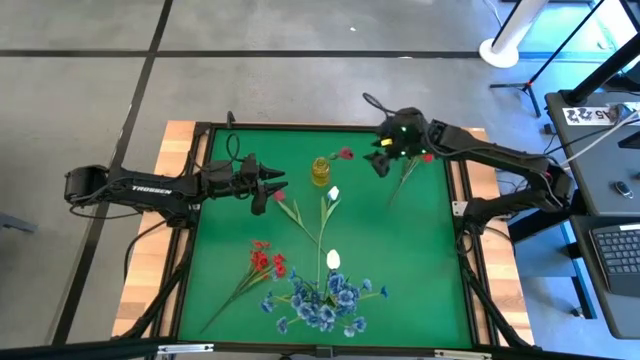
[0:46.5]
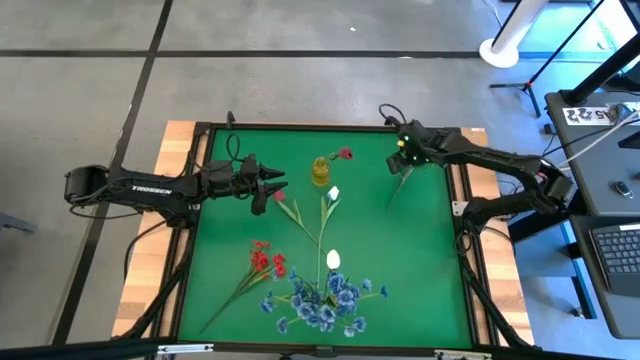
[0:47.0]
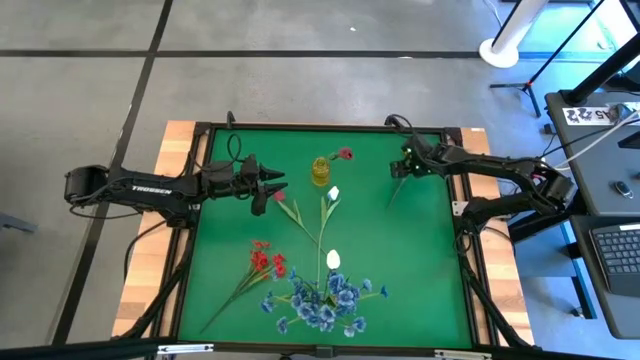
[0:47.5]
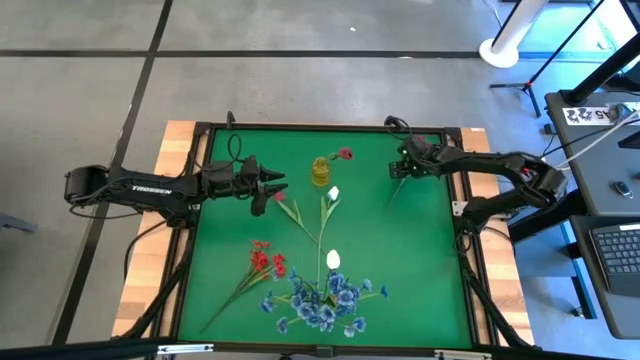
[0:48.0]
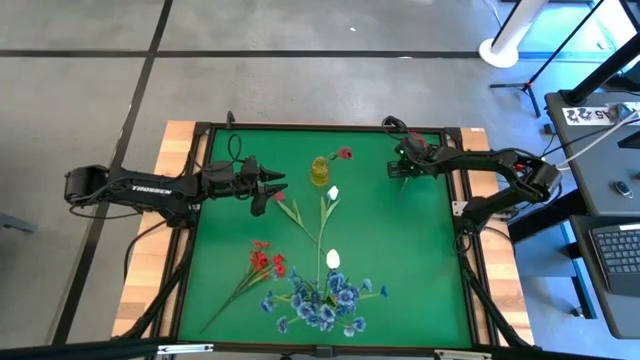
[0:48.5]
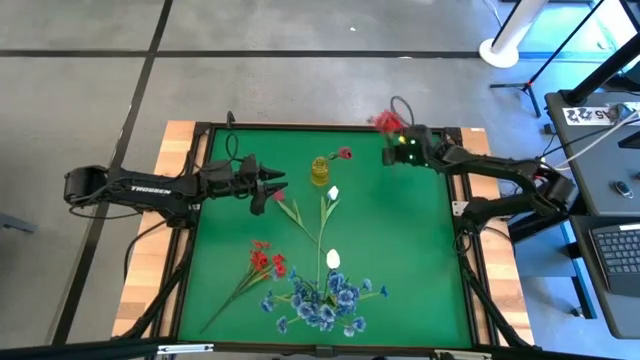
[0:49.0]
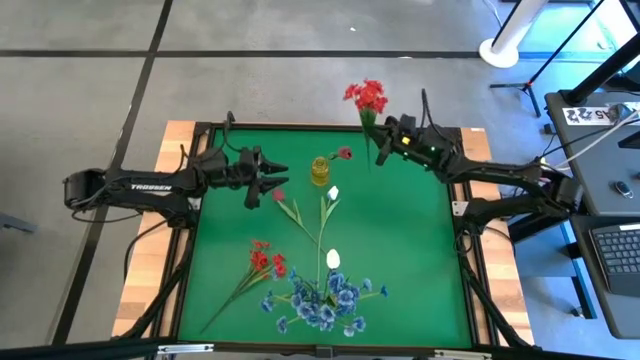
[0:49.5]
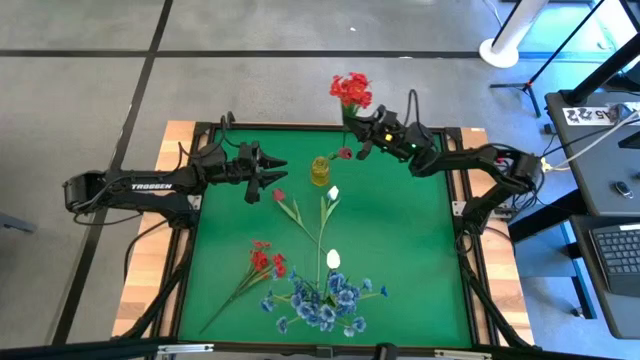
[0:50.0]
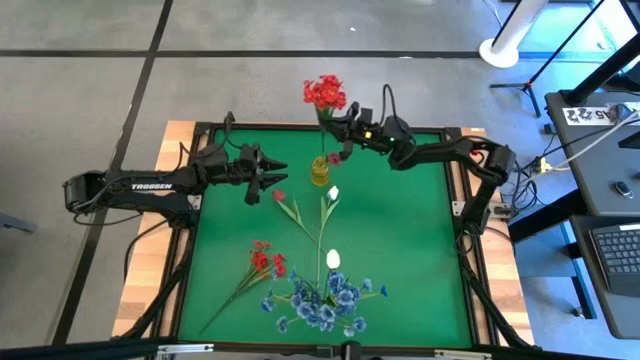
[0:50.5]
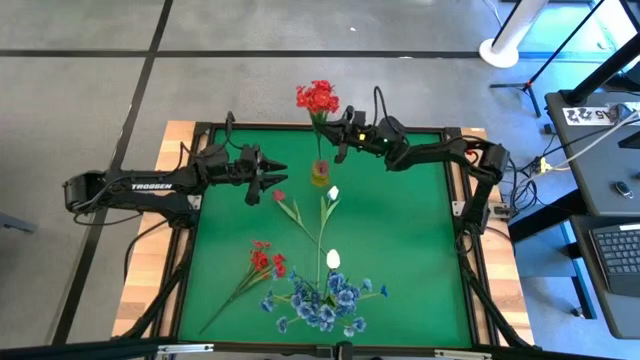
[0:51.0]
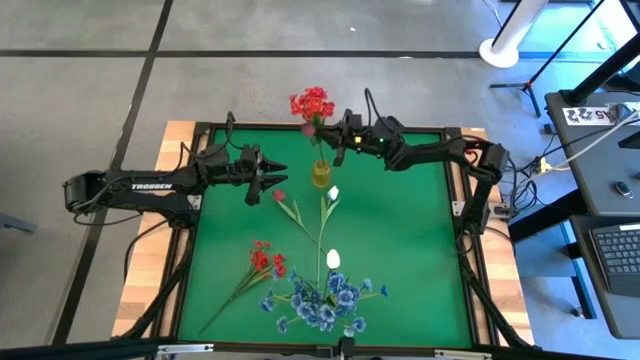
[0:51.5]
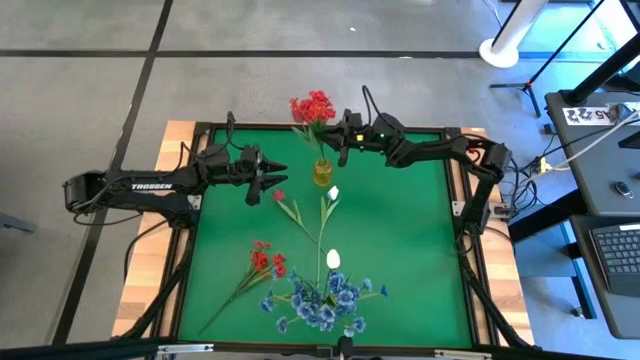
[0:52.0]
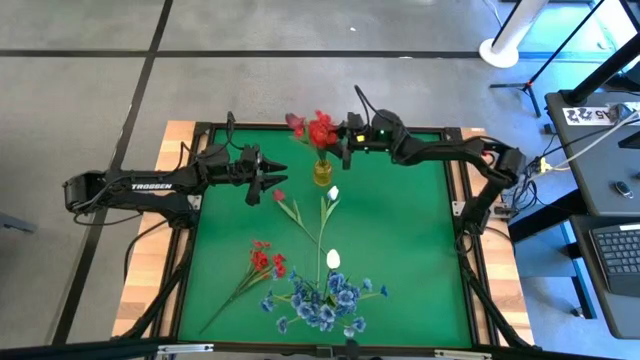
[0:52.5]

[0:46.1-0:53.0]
Task: Sort flowers into vase by color
Put the top red flowers into the yellow vase

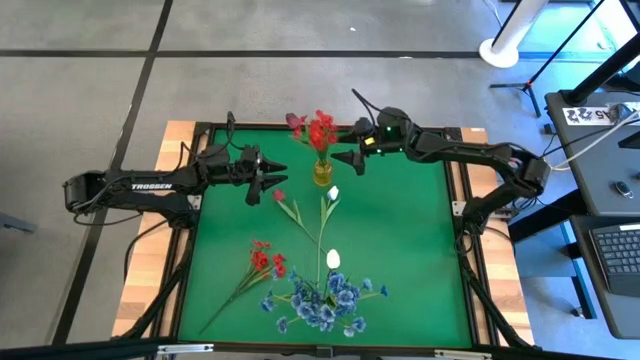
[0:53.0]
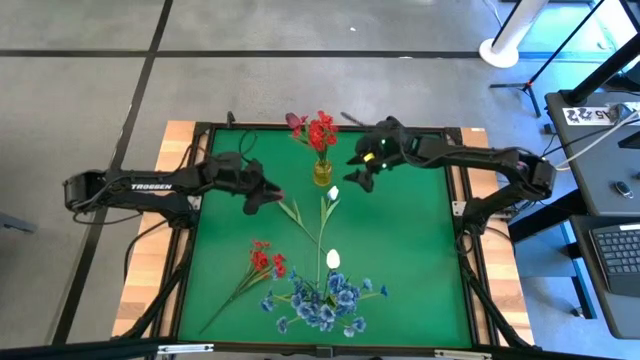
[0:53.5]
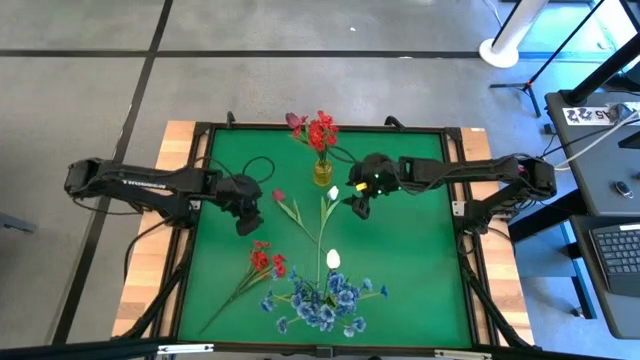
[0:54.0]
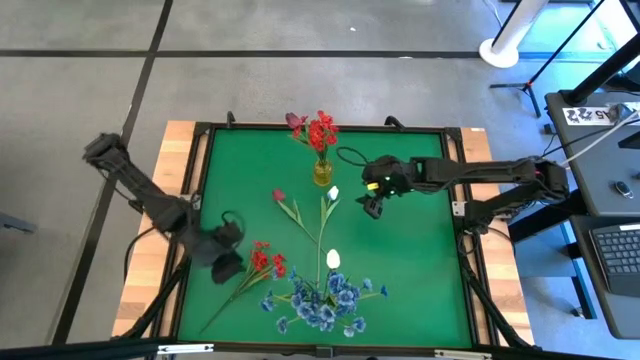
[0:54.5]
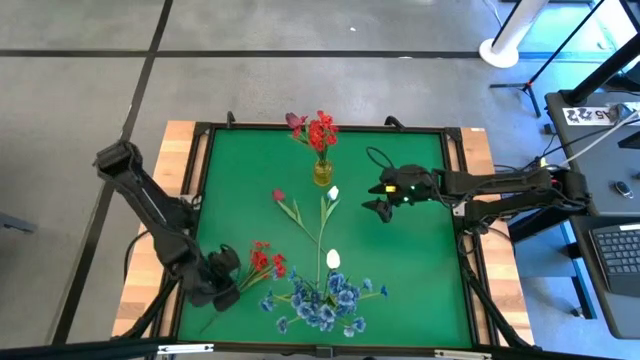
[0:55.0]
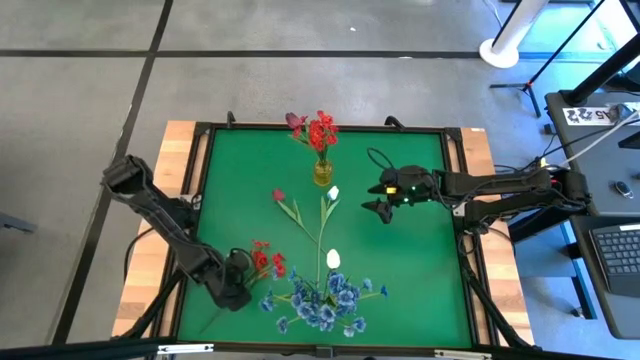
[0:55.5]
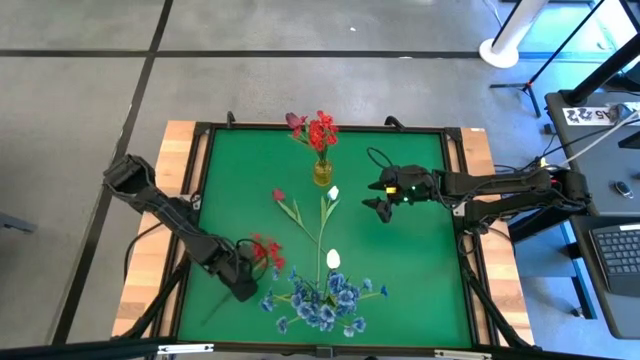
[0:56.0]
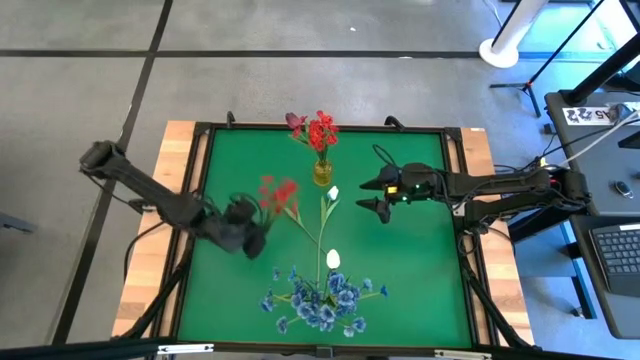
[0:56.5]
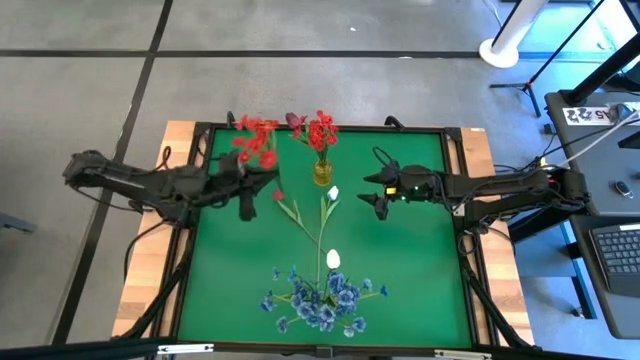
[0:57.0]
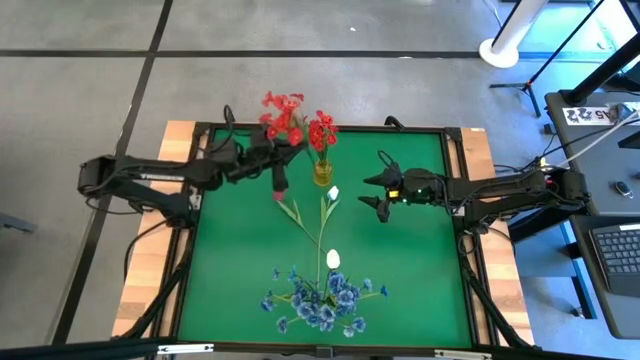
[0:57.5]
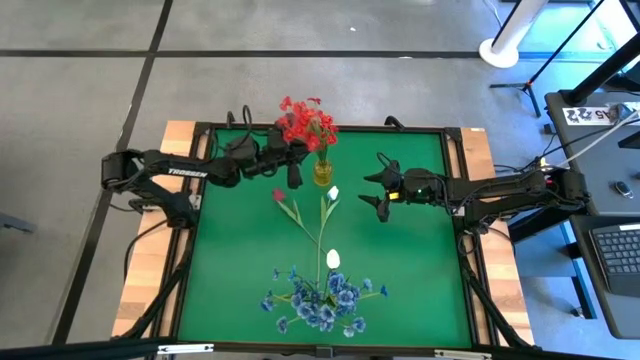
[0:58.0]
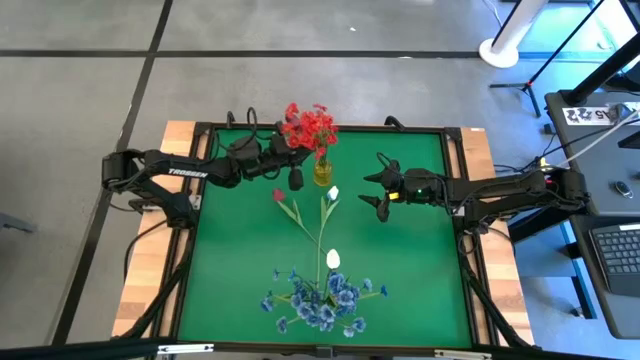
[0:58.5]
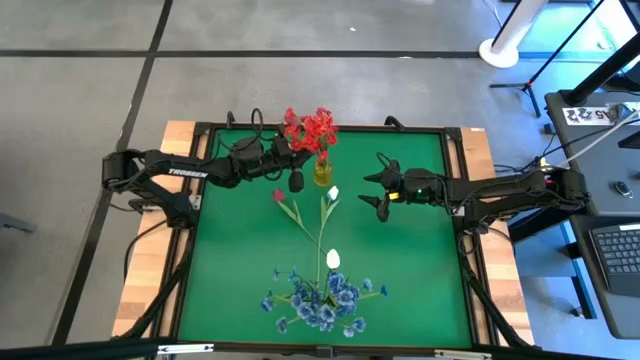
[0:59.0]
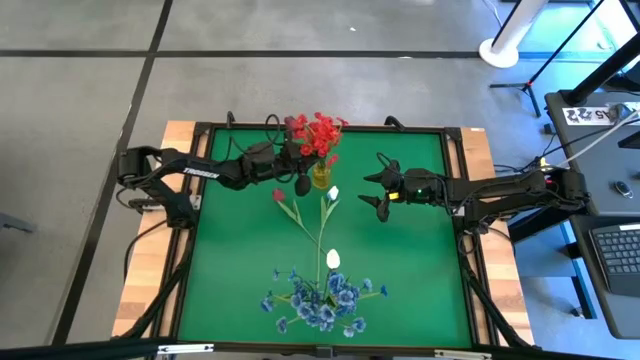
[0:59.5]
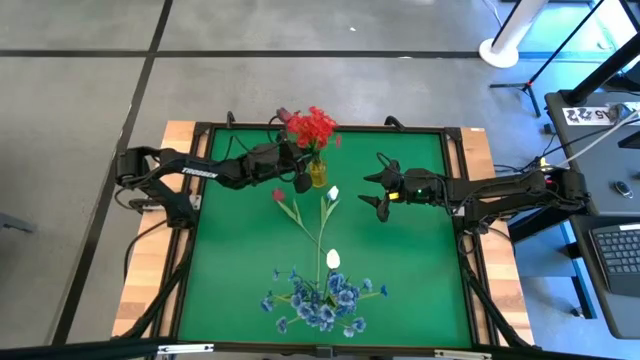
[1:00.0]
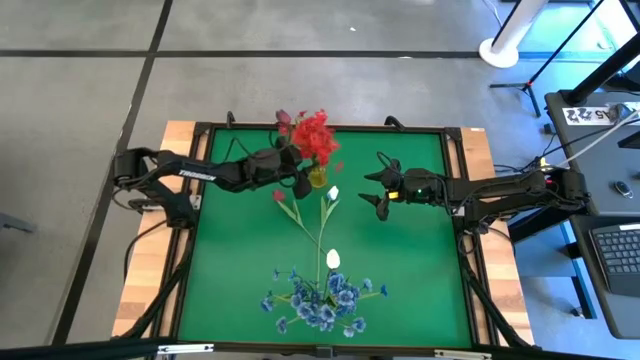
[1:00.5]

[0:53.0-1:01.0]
Put the red flowers into the yellow vase

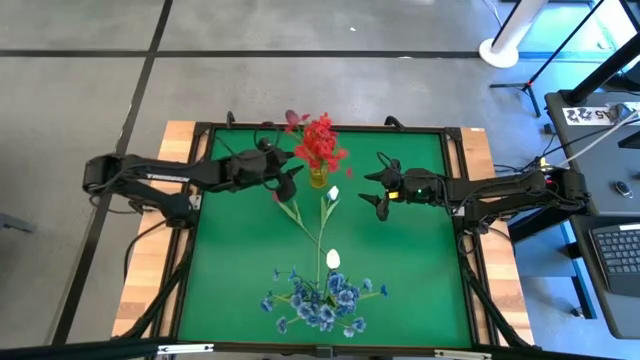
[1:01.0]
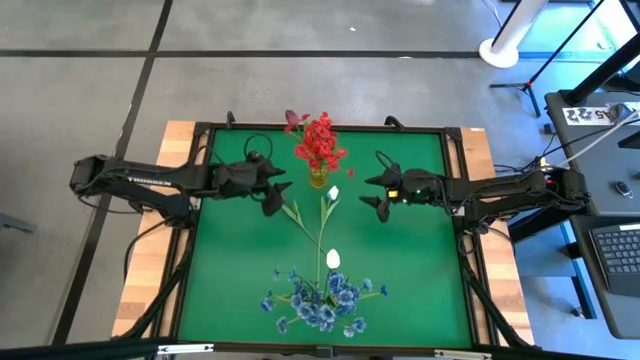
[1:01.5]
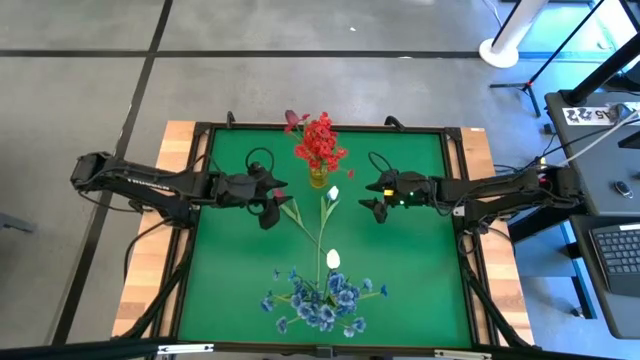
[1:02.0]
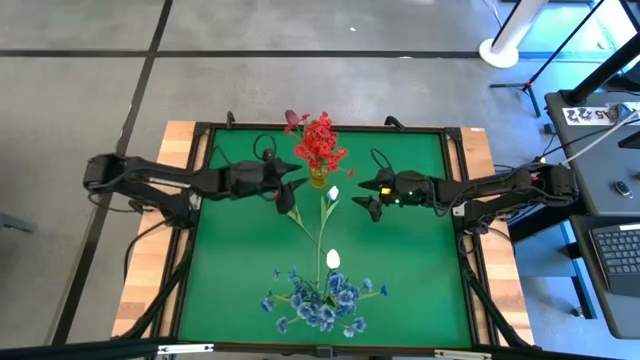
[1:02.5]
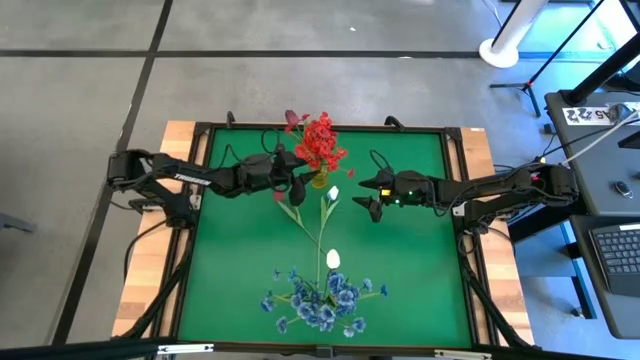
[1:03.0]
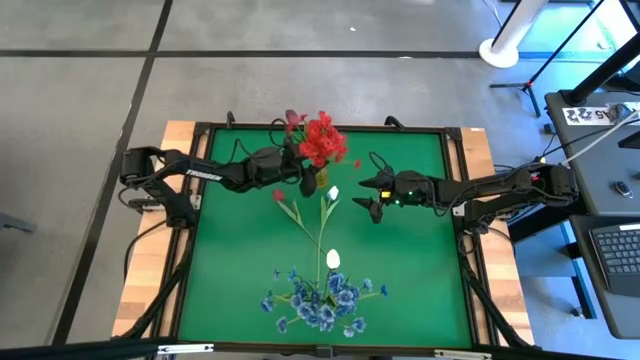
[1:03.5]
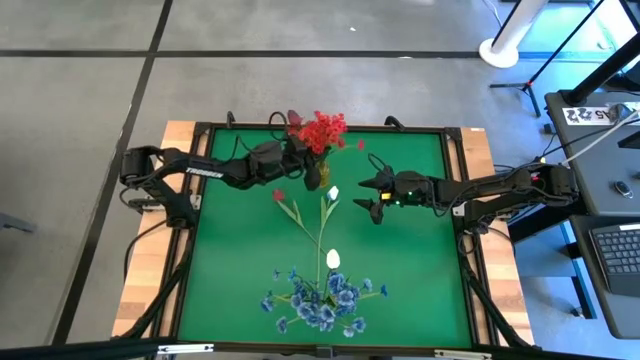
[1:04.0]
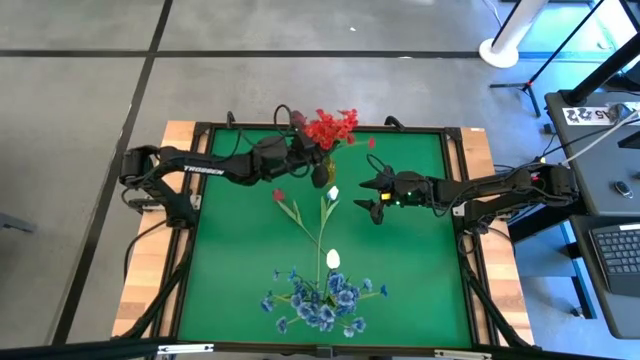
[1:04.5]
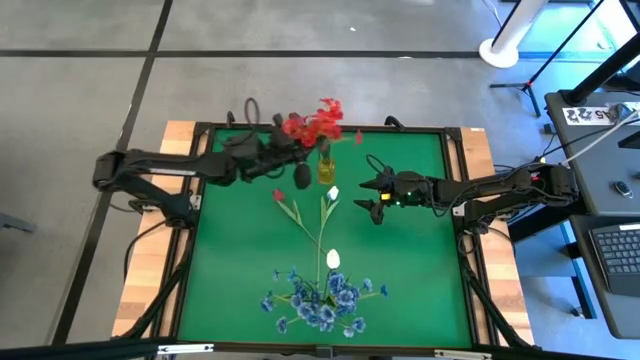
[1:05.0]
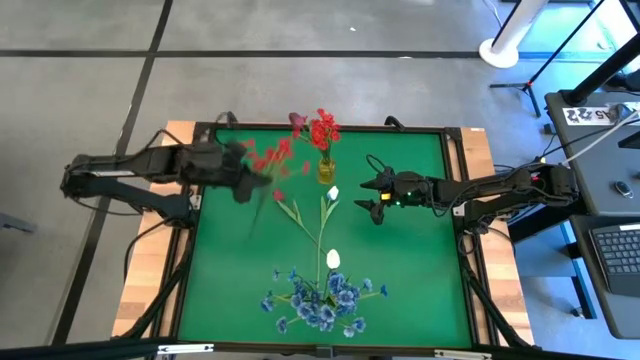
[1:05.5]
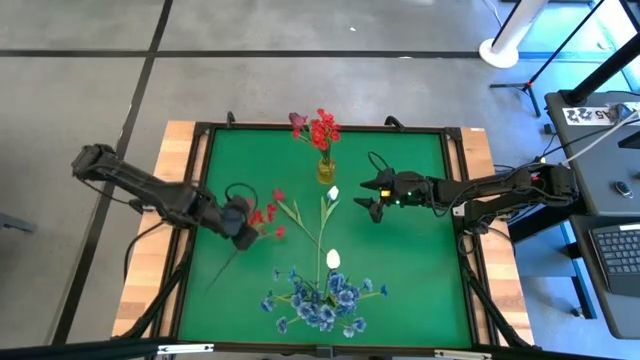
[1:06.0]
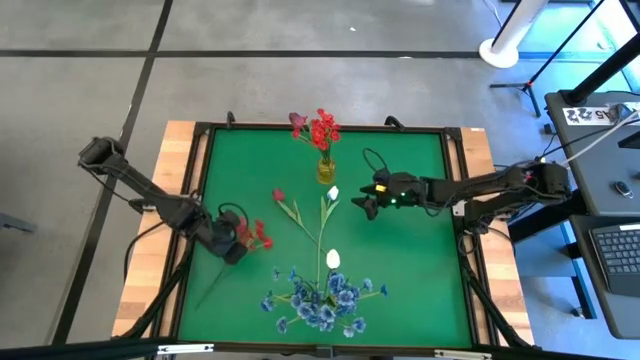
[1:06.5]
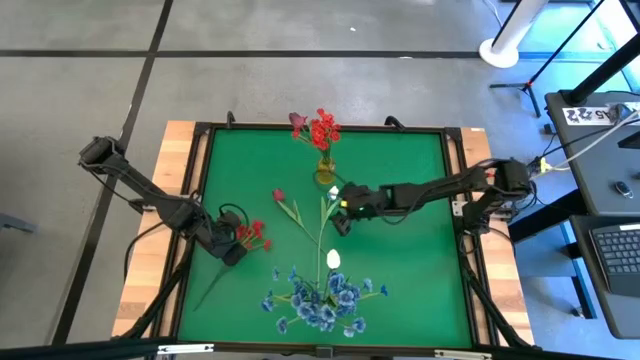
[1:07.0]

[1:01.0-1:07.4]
Remove the red flowers from the yellow vase

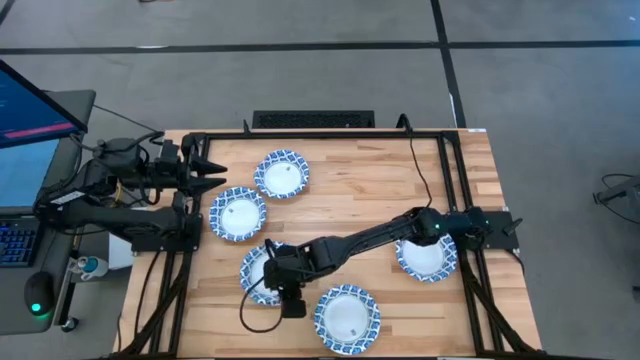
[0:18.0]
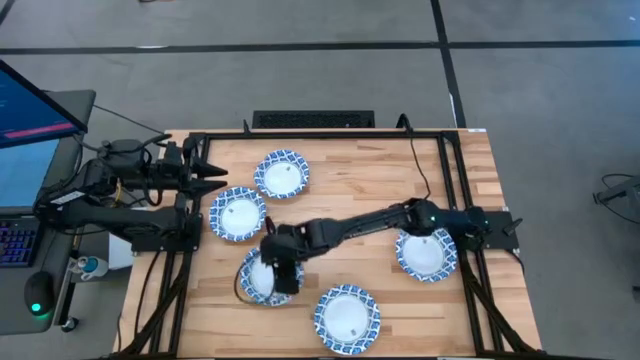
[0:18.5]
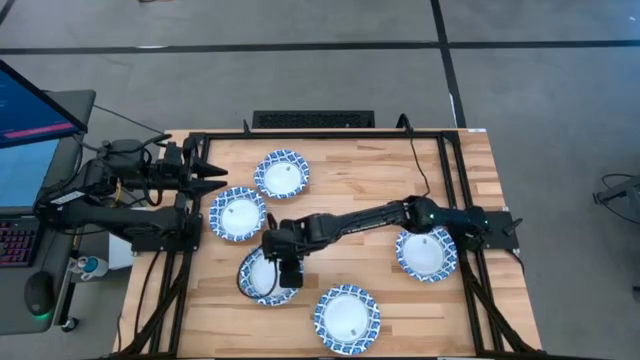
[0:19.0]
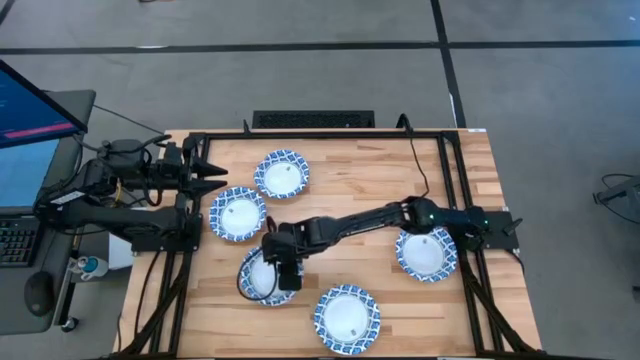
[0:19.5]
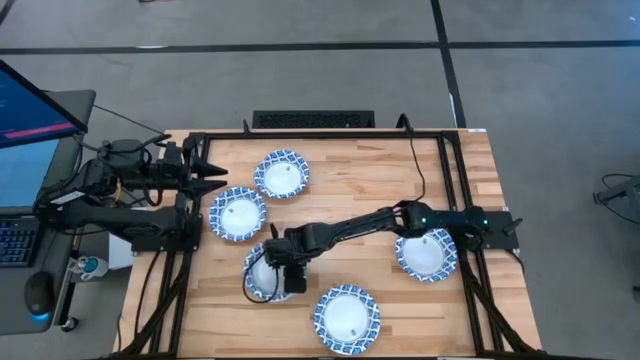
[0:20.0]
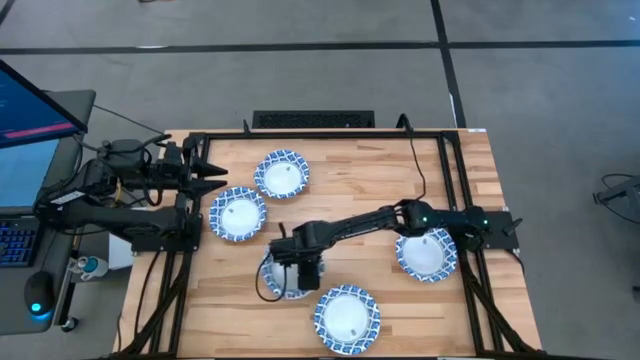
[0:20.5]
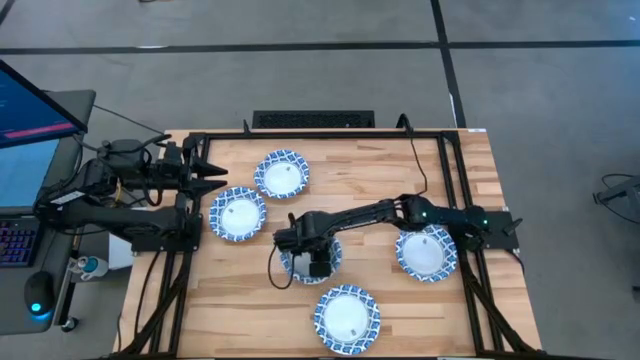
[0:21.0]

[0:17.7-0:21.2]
Task: Nest bowls inside each other
Move the stacked blue patterned bowl to the center of the table
